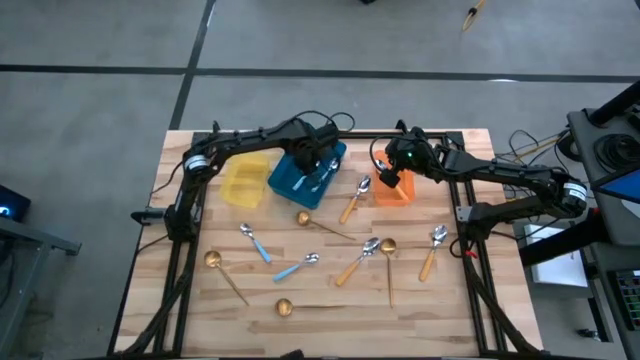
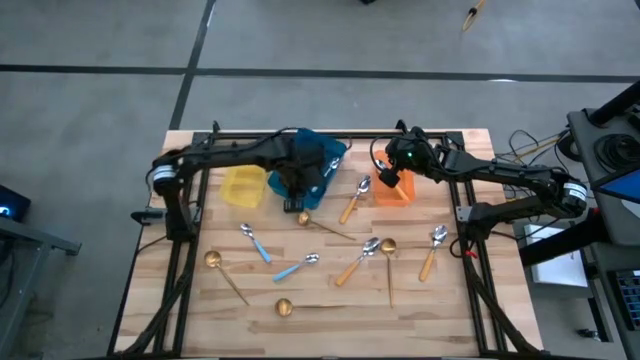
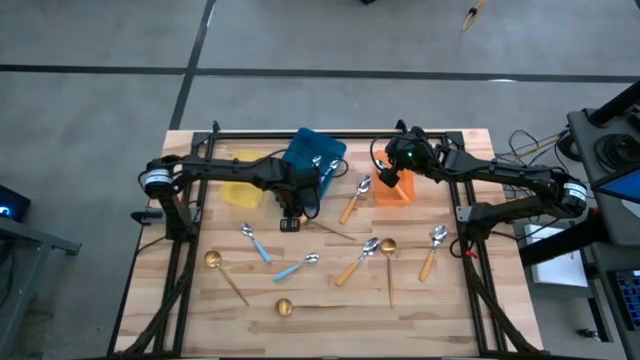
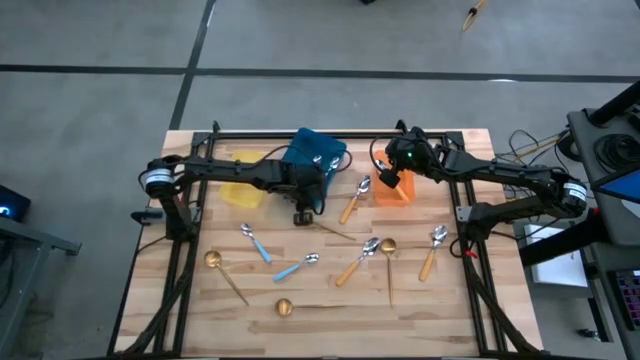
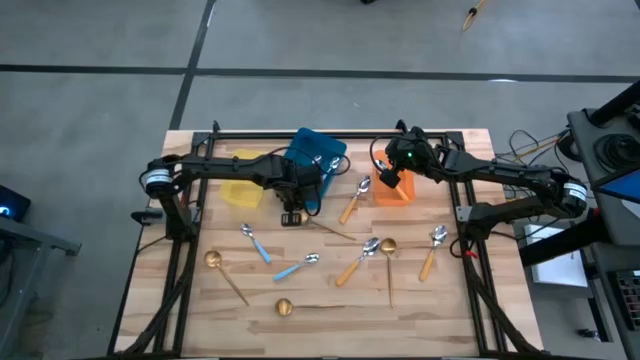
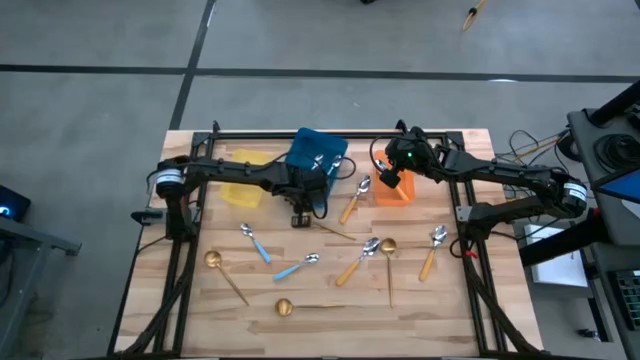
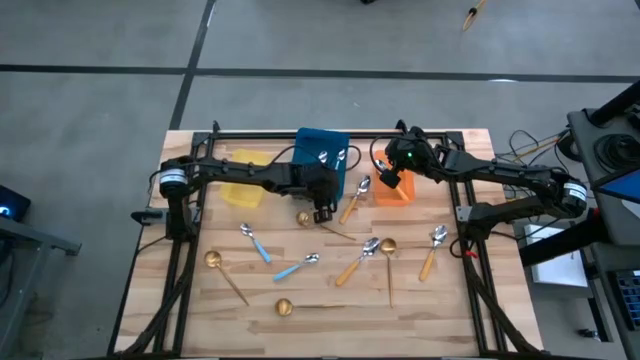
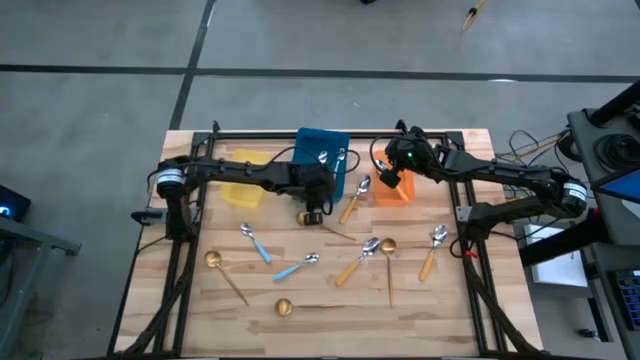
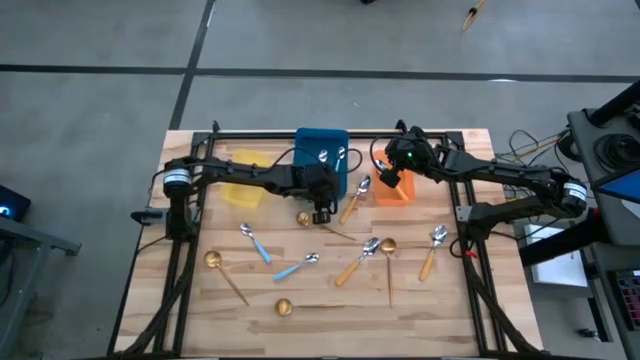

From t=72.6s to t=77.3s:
Task: Sort silverware by color (type)
Adjust the blue bin

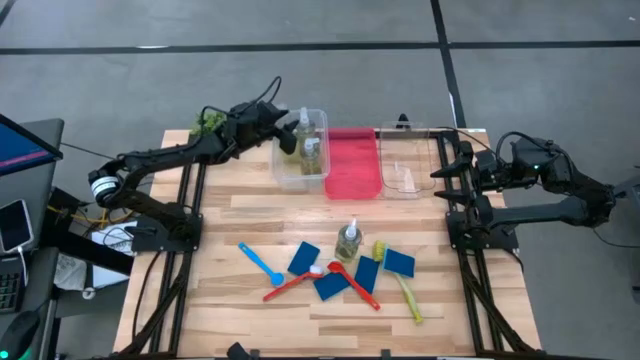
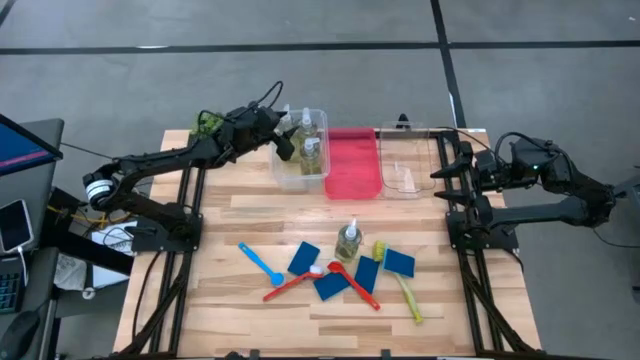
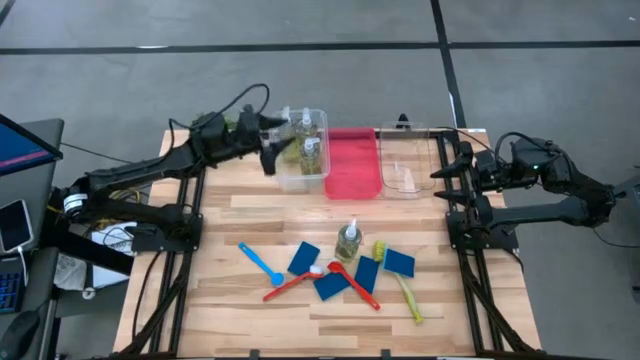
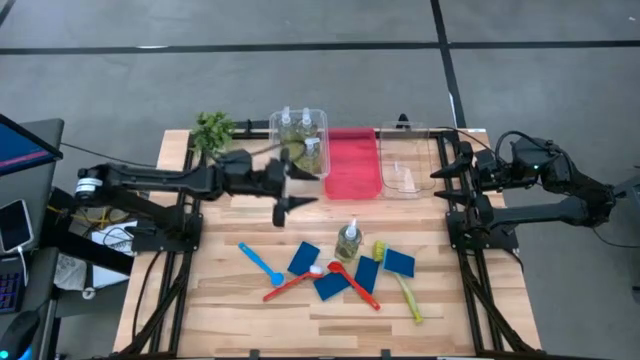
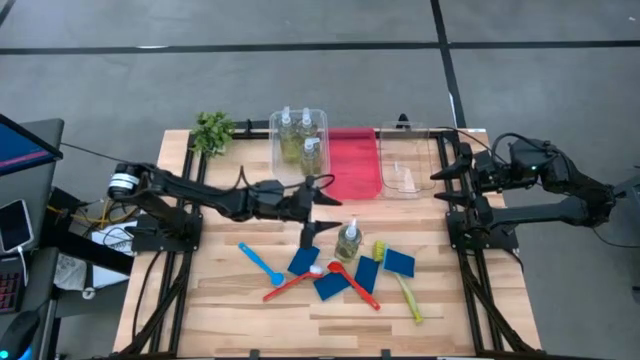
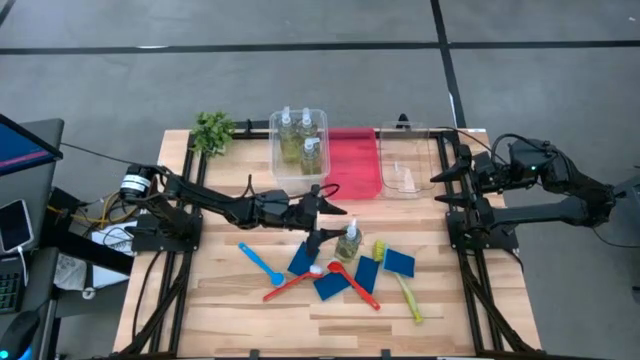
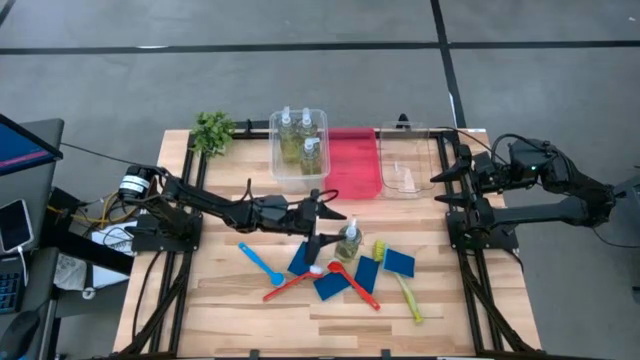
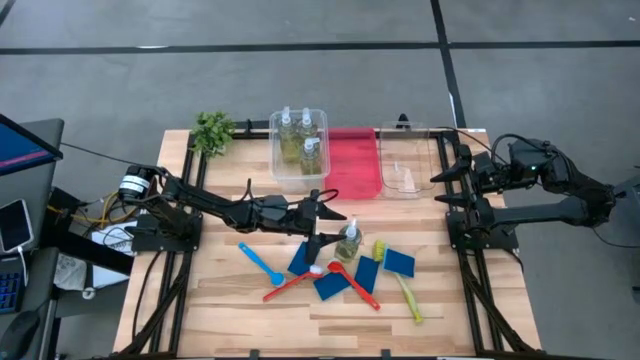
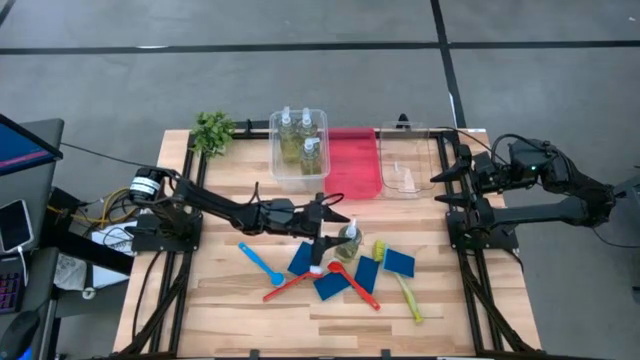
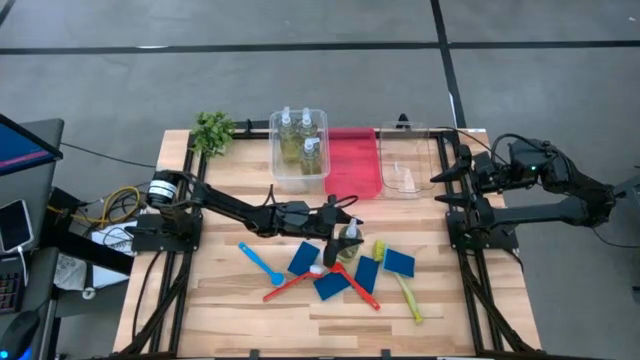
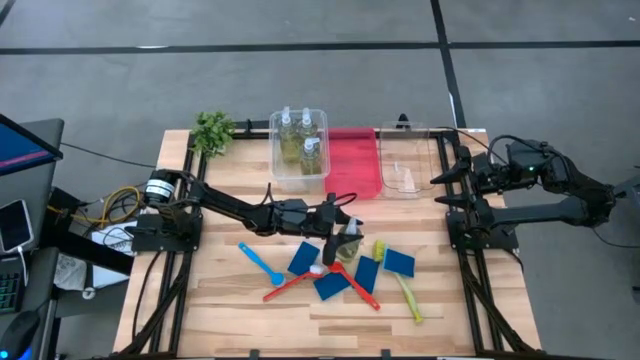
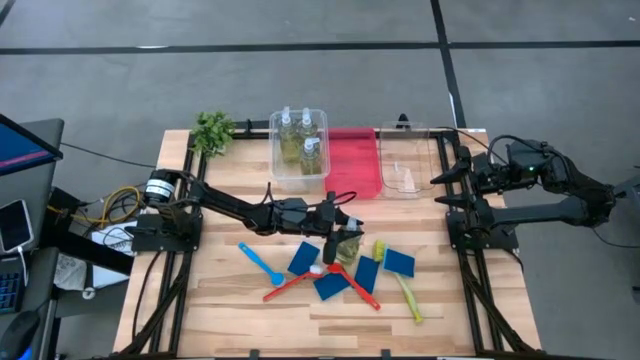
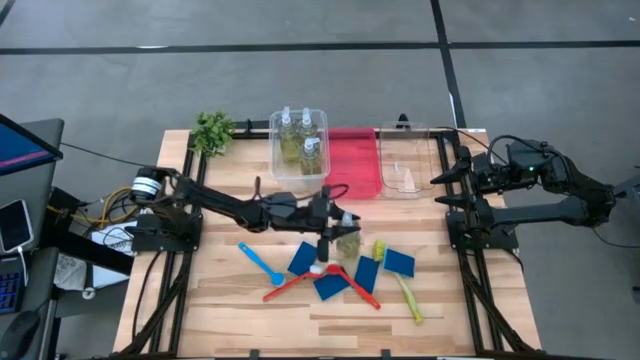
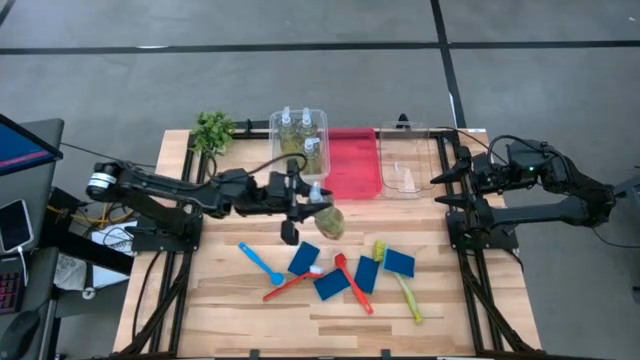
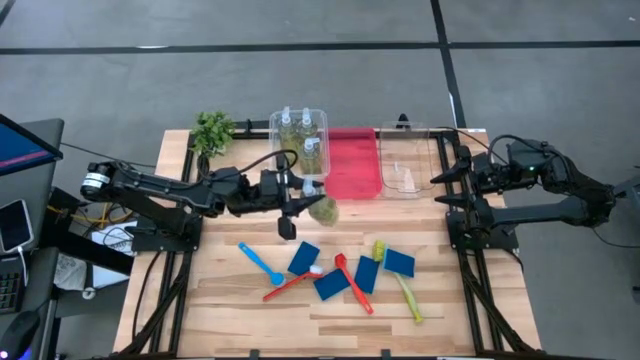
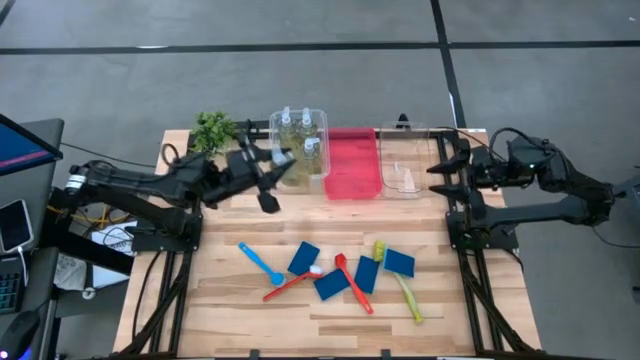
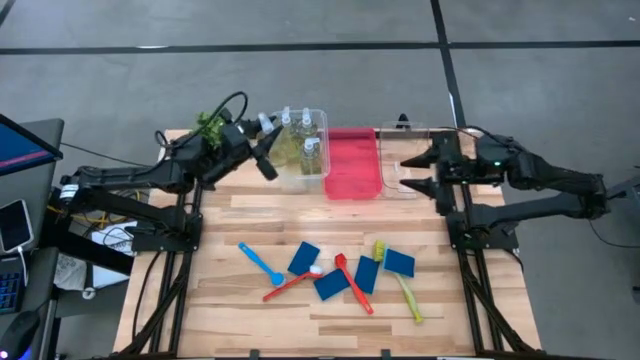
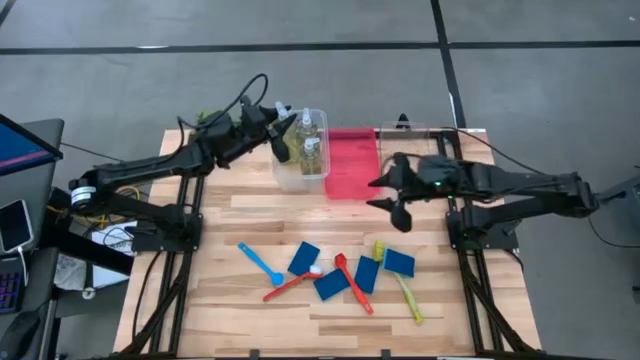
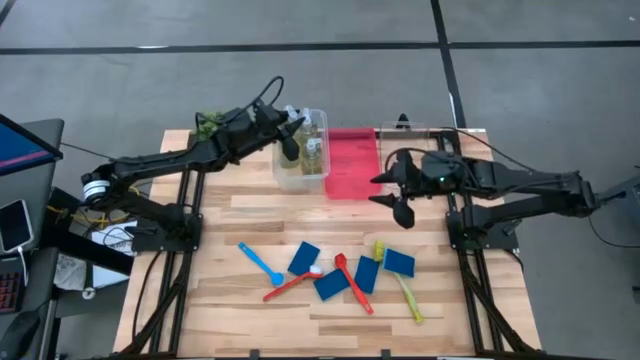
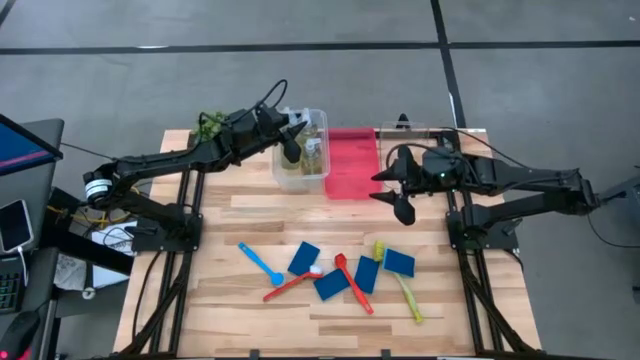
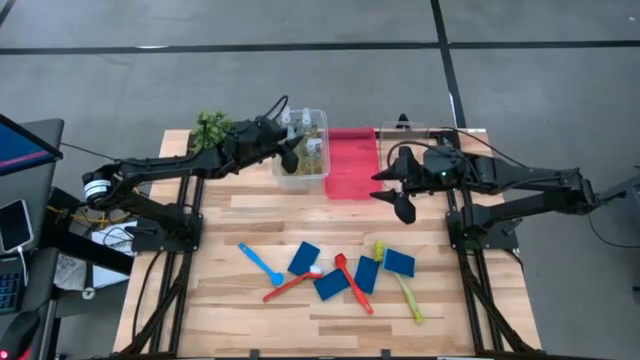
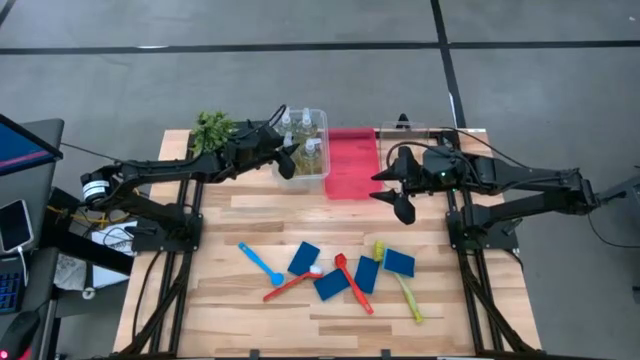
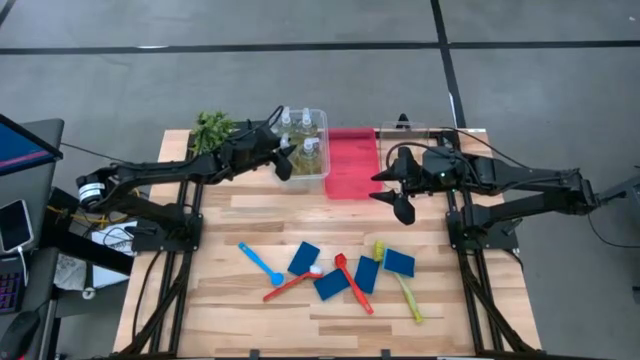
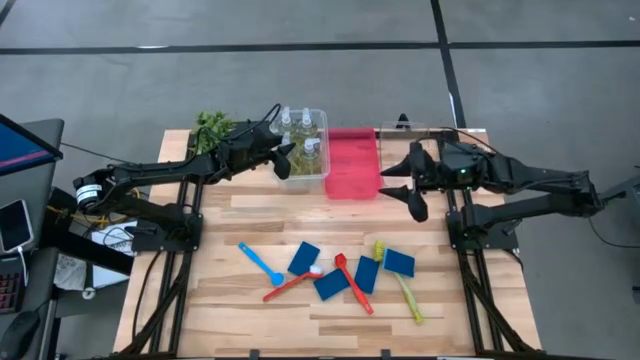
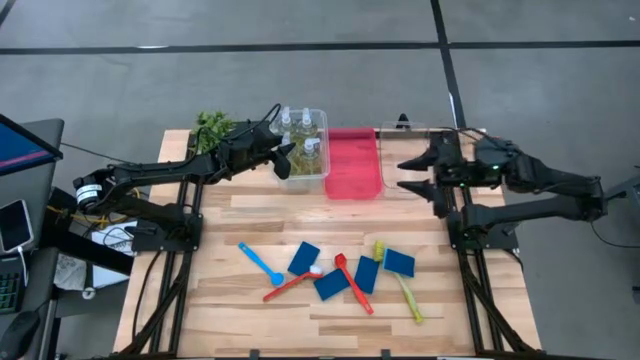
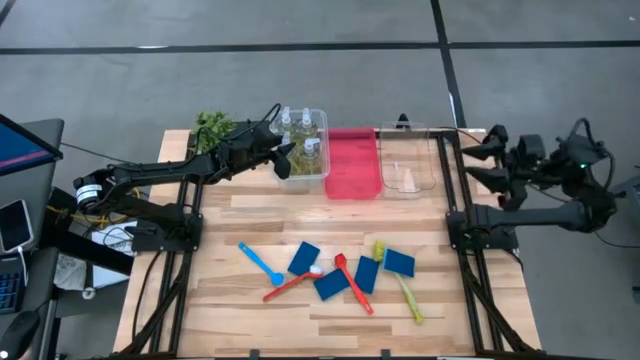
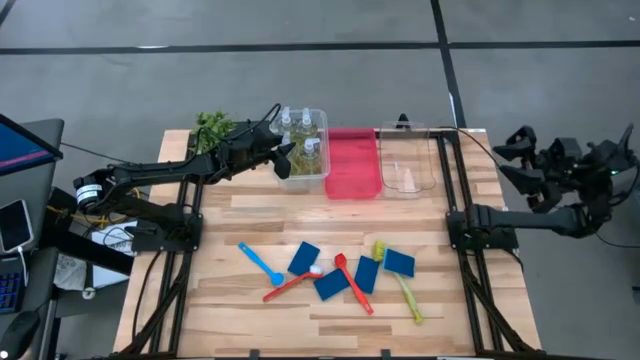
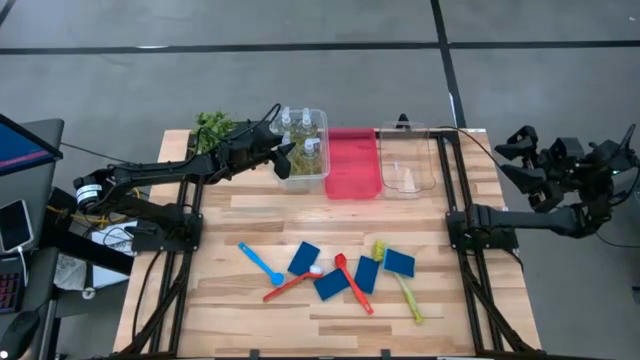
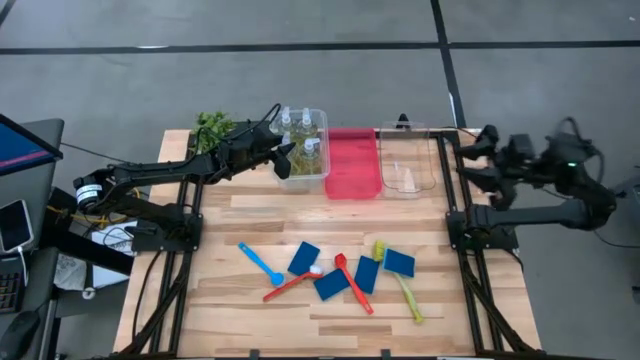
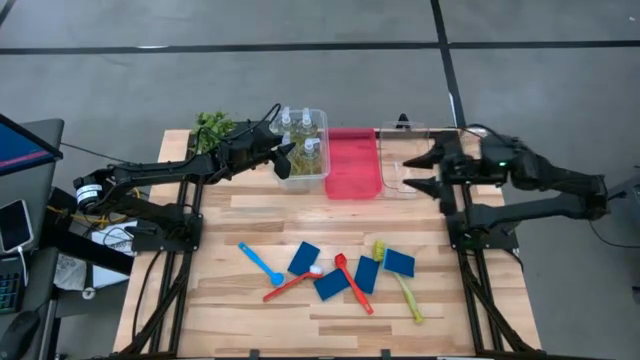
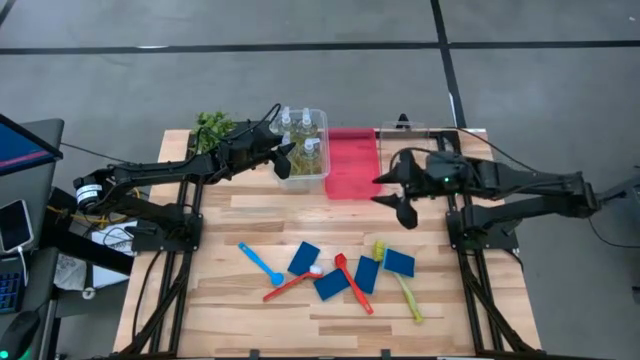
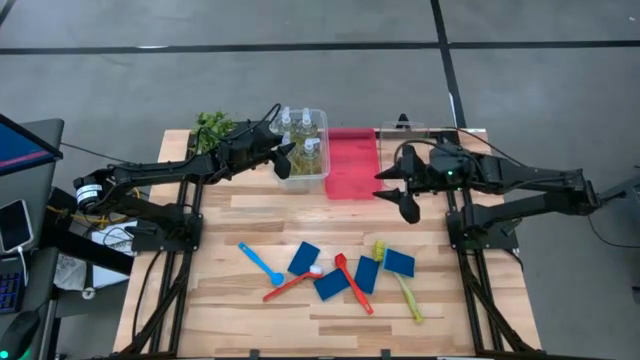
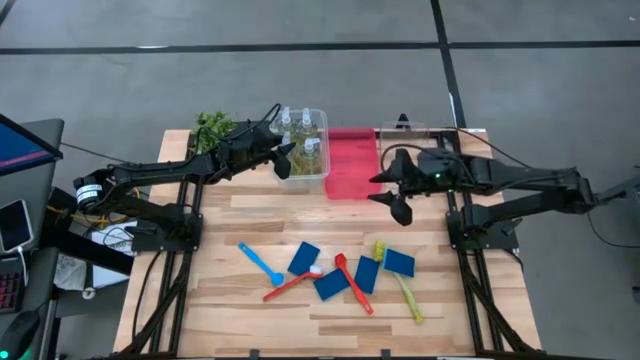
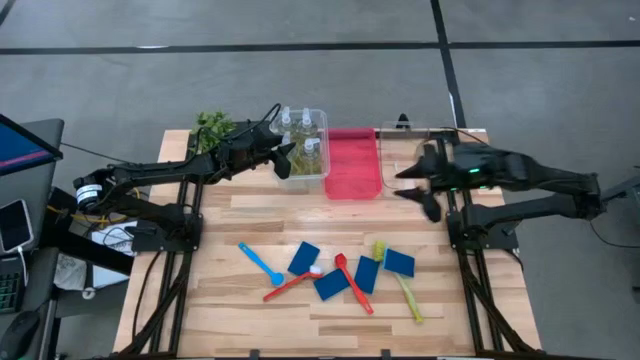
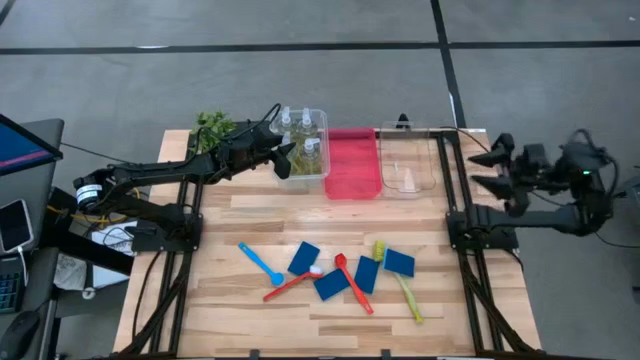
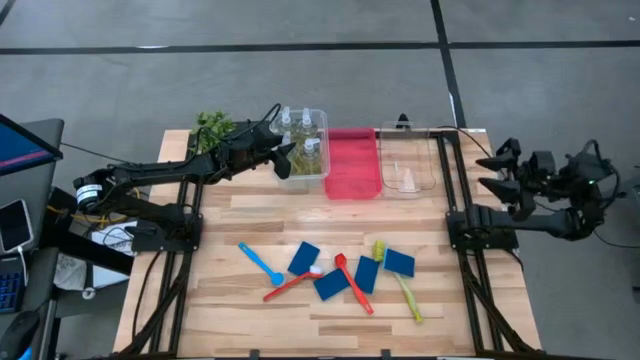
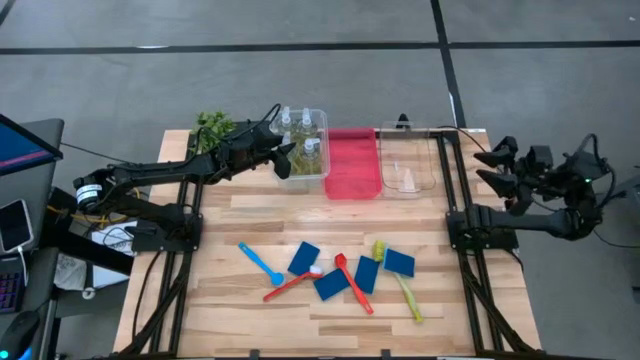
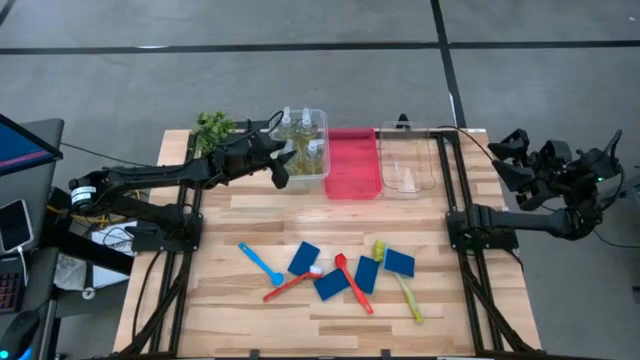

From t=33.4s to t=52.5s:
Task: Pick & Place Kitchen Sink Supplies
Put the transparent soap dispenser into the transparent container
